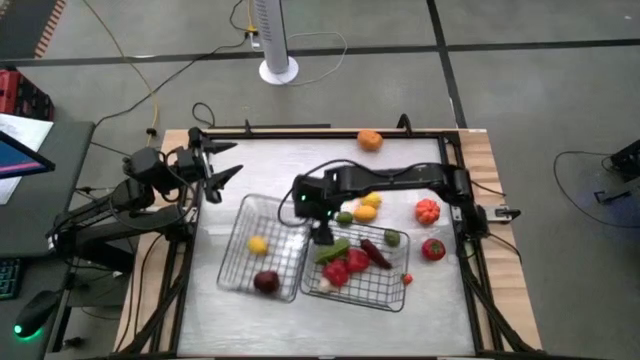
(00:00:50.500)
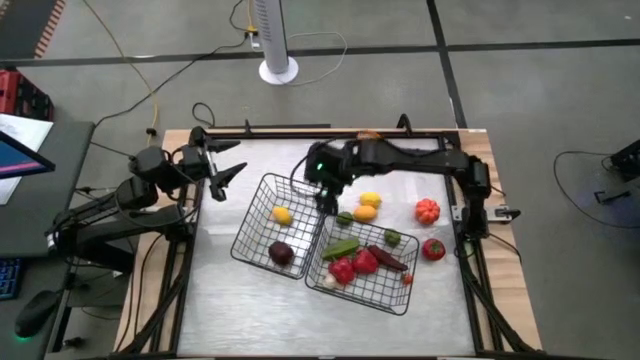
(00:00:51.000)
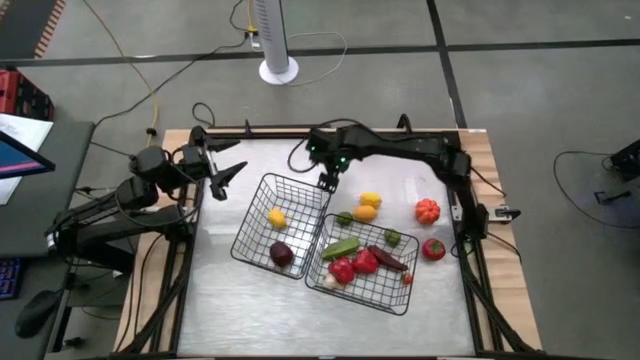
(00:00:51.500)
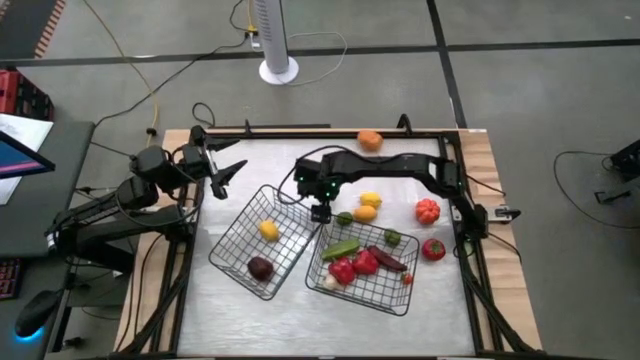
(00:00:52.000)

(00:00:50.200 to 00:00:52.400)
Task: Sort produce into baskets
Adjust the left wire basket

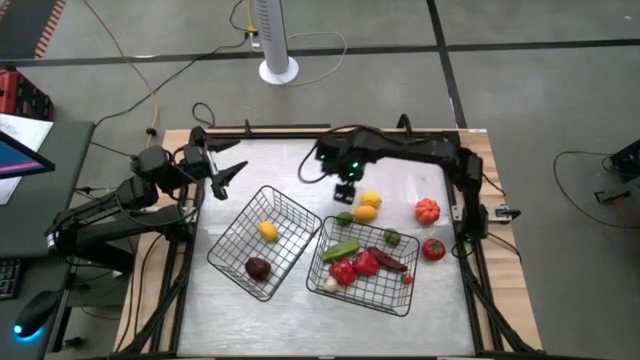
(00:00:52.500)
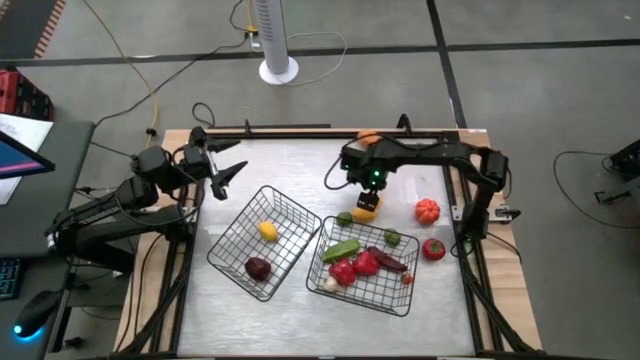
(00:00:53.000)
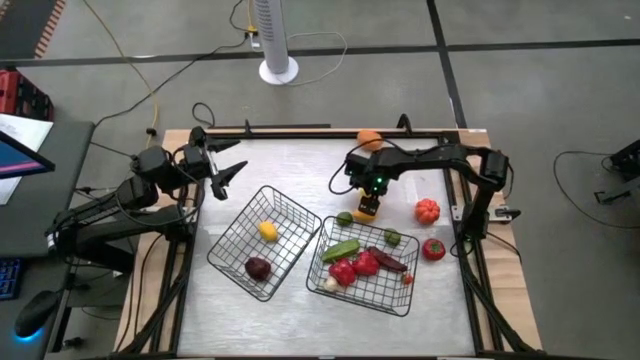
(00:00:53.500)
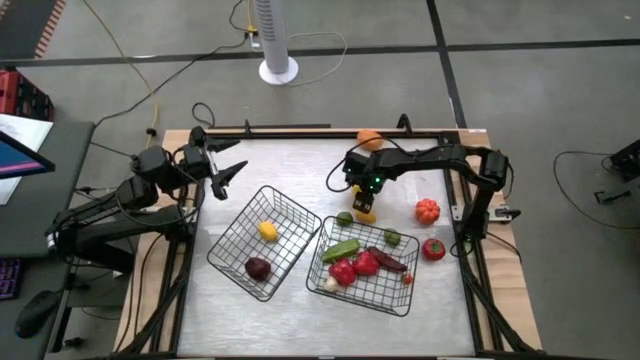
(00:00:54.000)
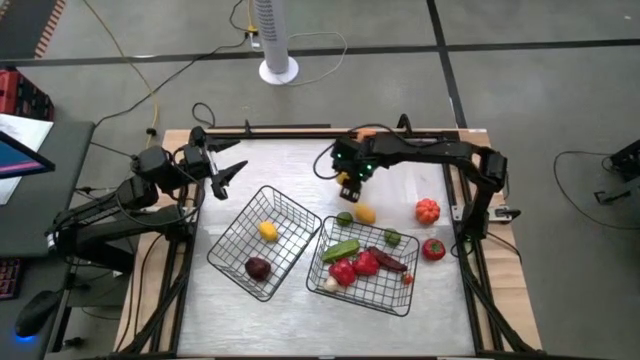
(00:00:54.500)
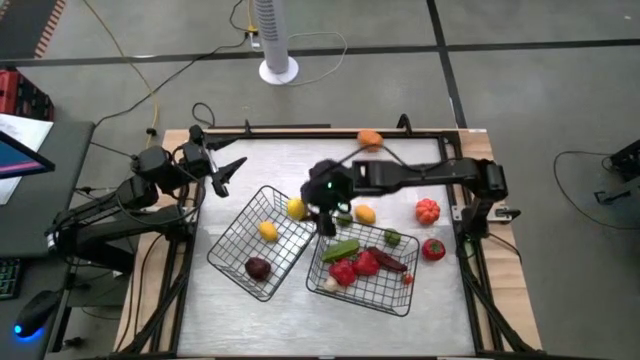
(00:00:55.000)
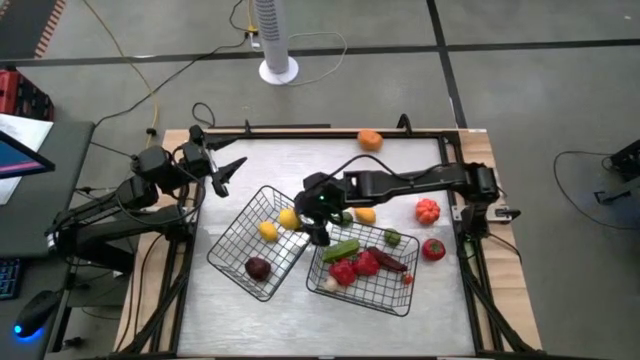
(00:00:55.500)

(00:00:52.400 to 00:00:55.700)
Put the top lemon into the left wire basket

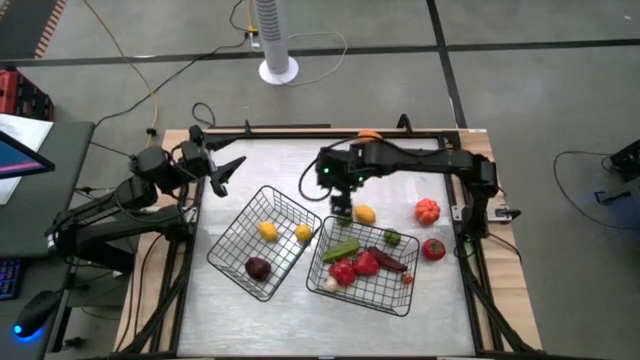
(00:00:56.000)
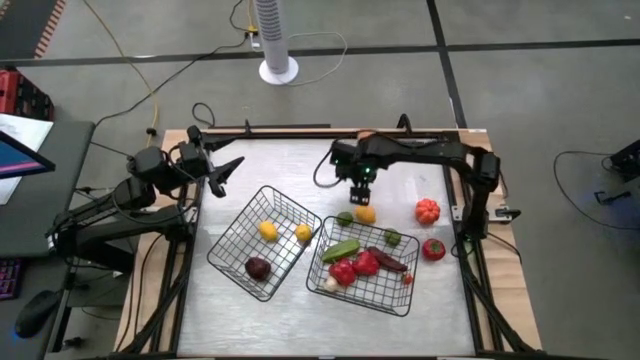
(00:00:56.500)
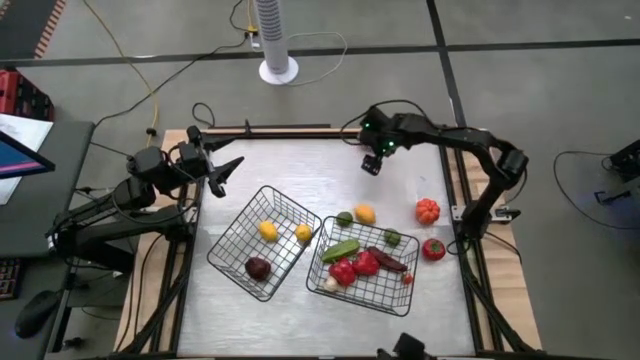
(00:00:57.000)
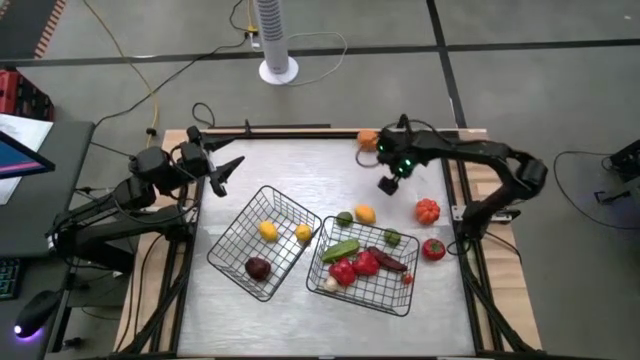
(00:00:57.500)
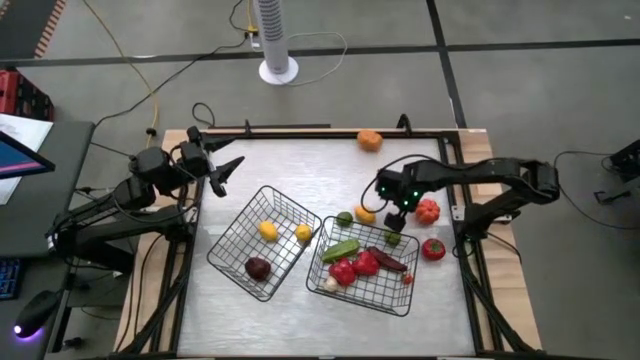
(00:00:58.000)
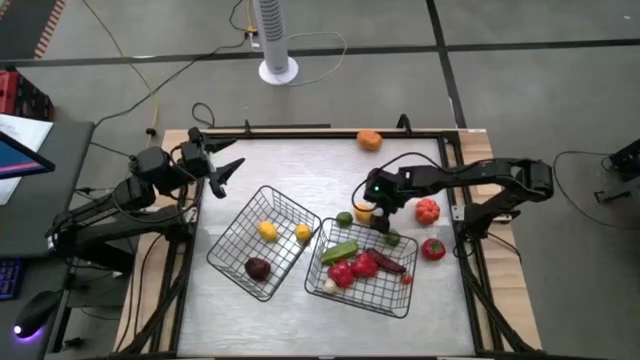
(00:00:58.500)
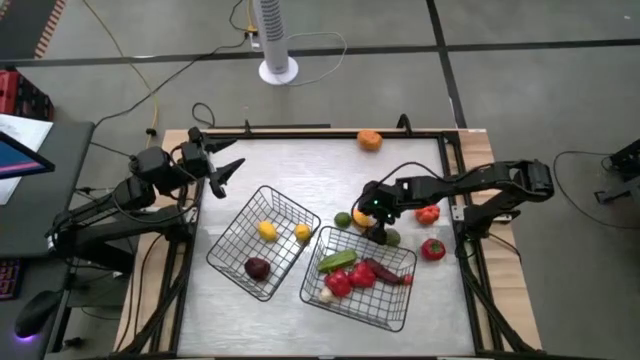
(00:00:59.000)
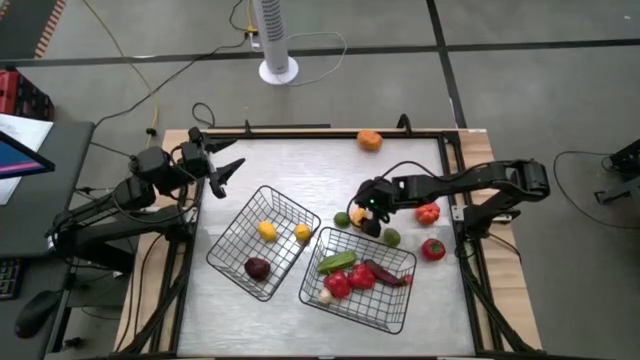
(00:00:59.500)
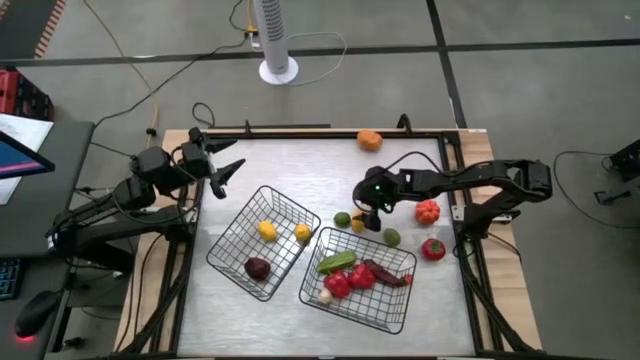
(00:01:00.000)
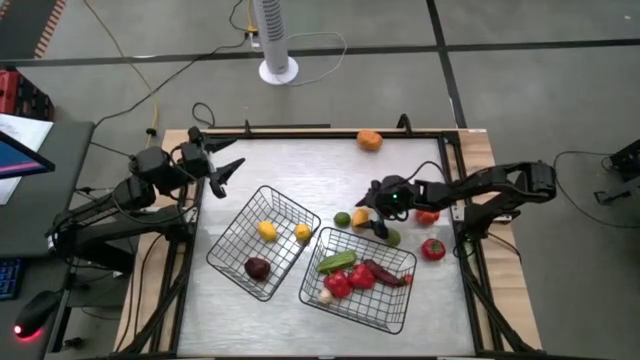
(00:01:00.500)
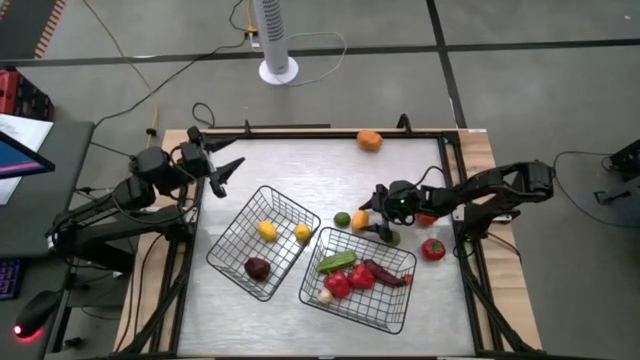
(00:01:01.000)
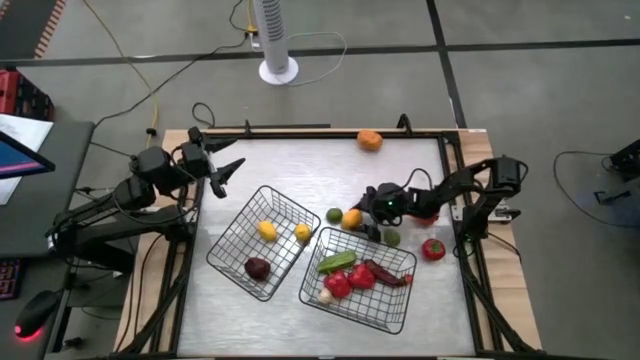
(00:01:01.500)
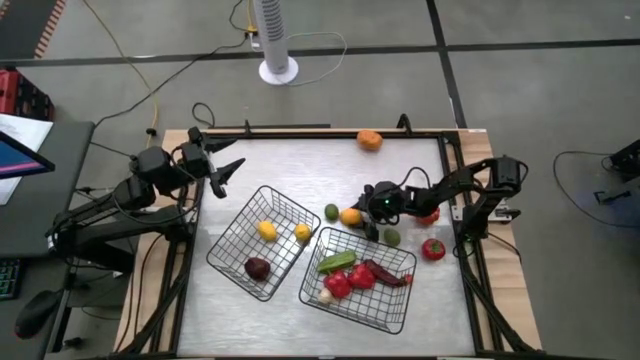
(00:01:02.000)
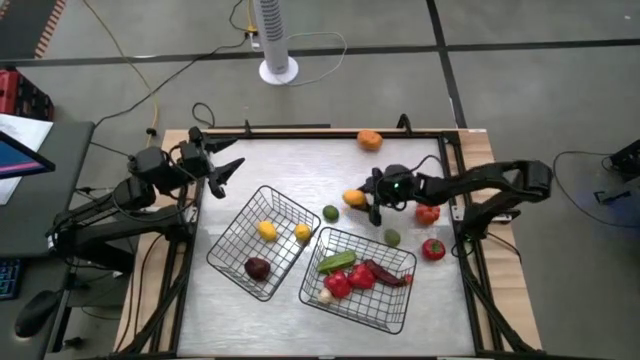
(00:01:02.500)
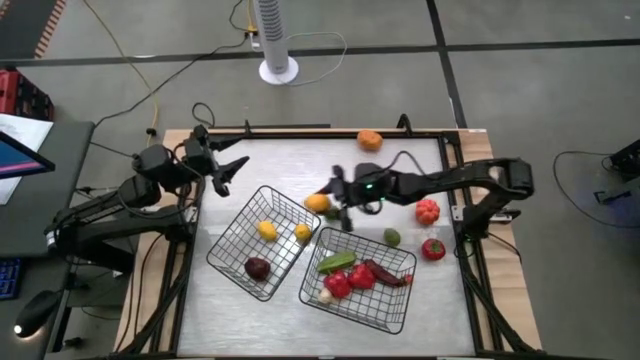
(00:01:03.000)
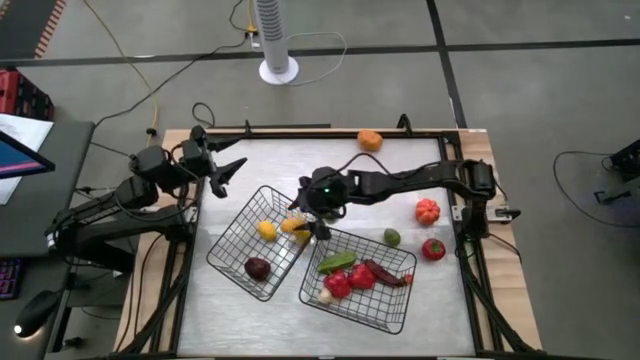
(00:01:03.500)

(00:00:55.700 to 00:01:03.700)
Put the lemon into the left wire basket

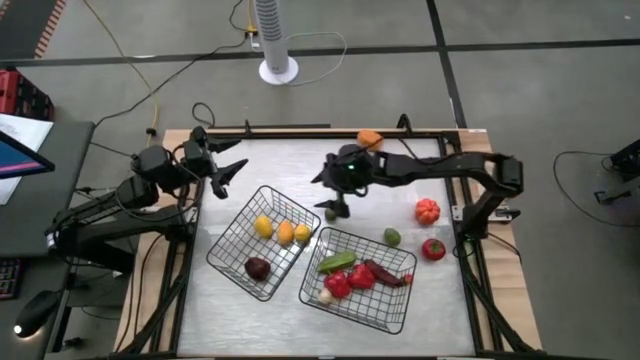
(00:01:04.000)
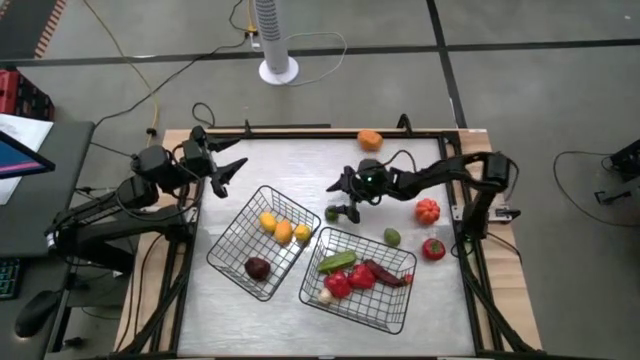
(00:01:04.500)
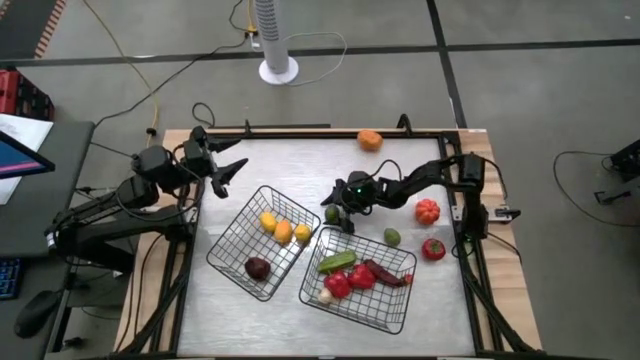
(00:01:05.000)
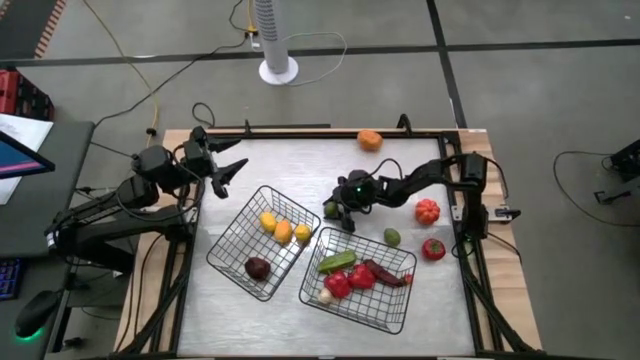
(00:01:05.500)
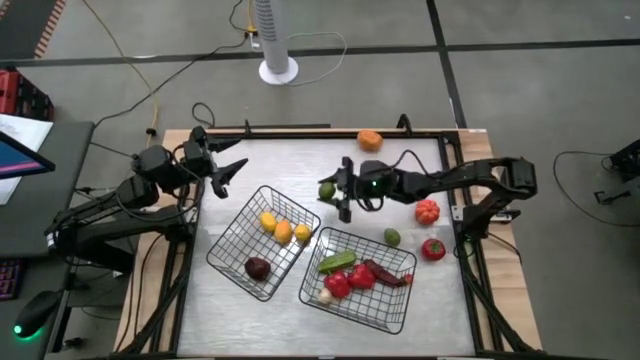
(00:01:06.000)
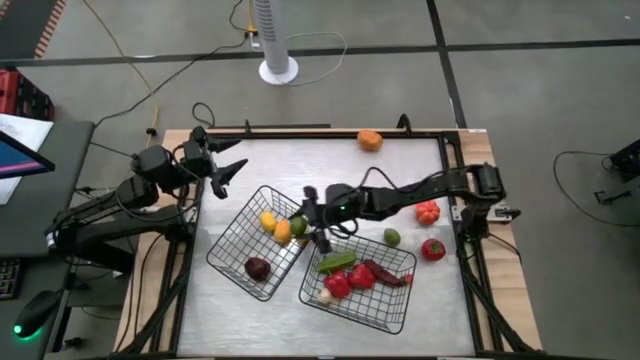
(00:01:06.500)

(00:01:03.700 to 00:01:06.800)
Put the left lime into the left wire basket

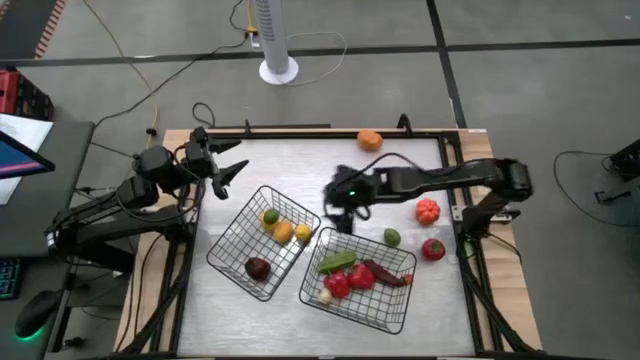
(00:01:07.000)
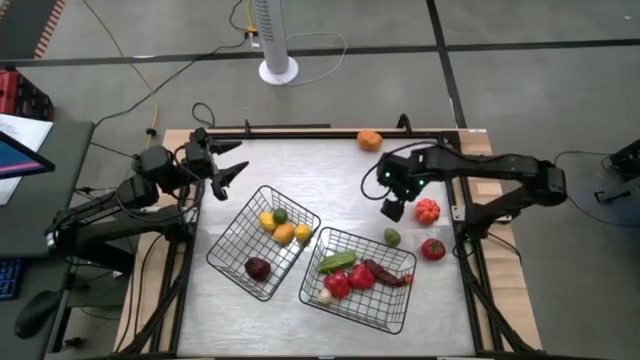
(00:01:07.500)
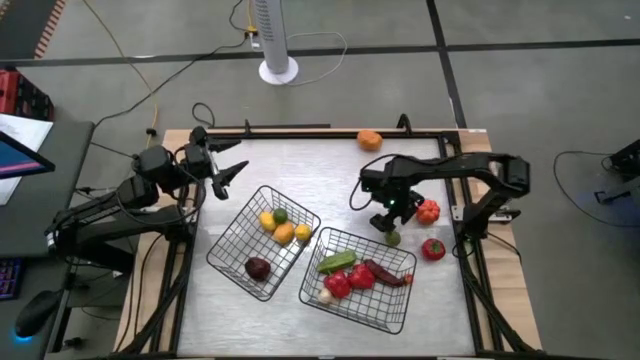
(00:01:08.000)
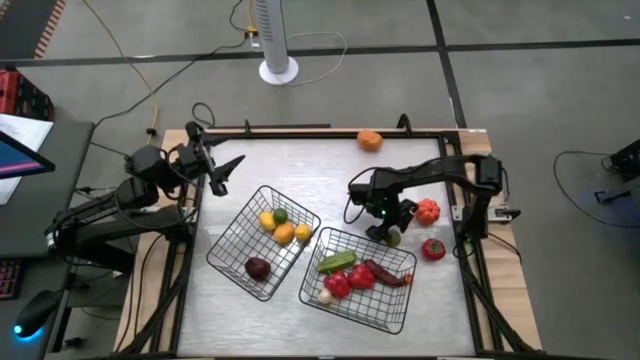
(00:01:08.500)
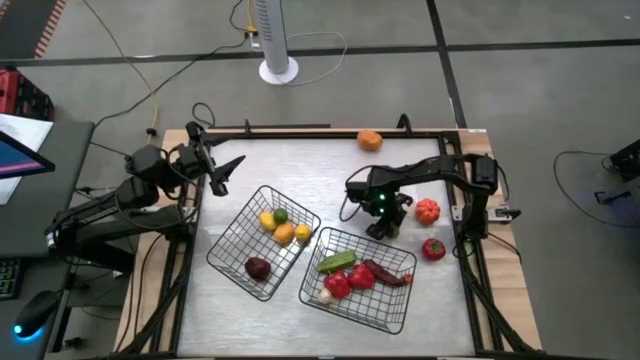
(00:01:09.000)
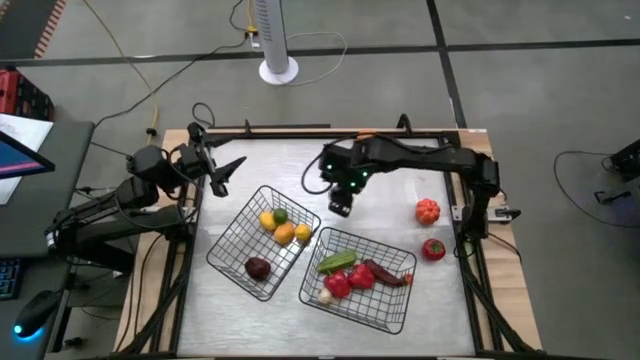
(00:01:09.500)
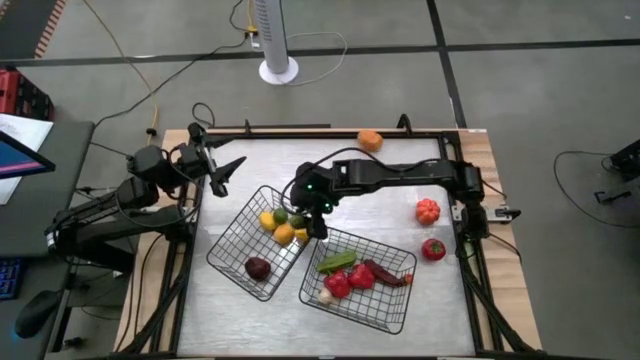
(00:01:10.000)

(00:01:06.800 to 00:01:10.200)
Put the lime into the left wire basket

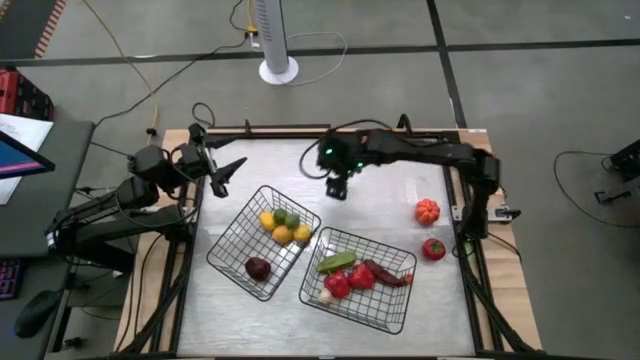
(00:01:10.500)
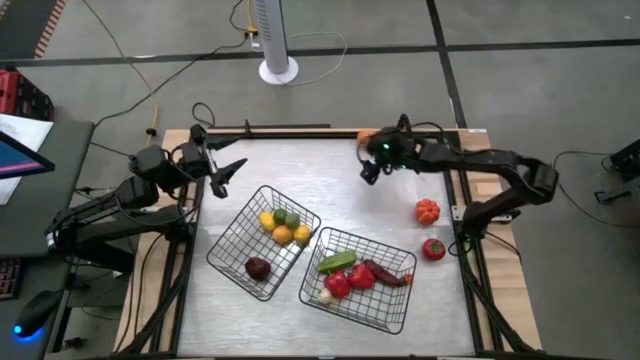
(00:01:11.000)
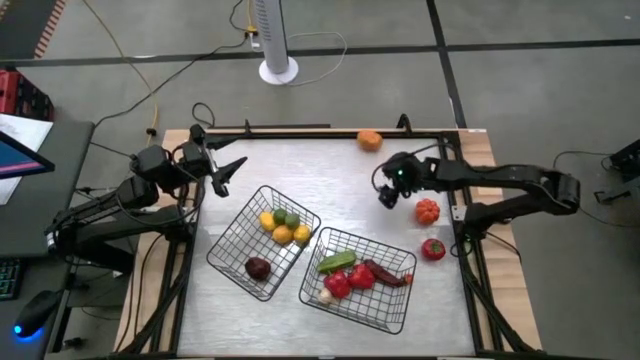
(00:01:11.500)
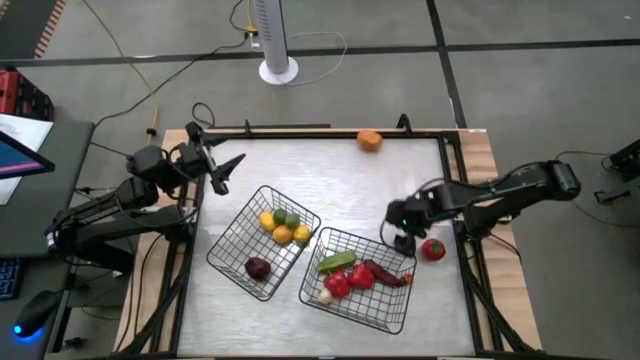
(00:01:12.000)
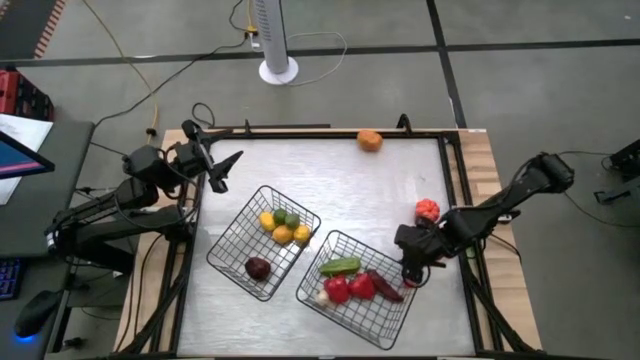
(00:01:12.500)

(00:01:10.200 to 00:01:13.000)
Adjust the right wire basket
